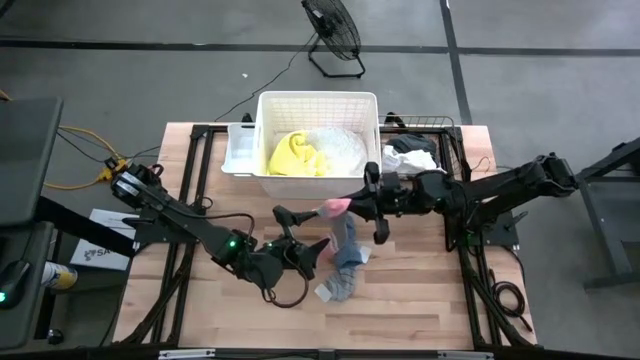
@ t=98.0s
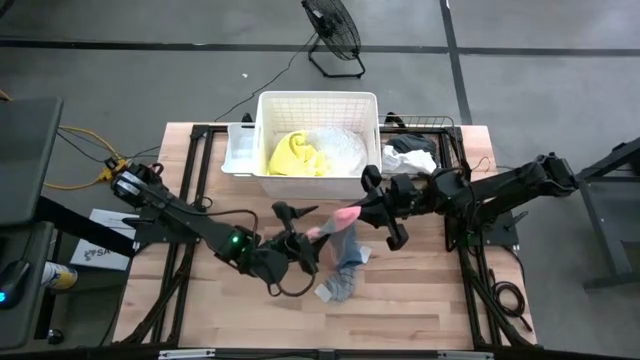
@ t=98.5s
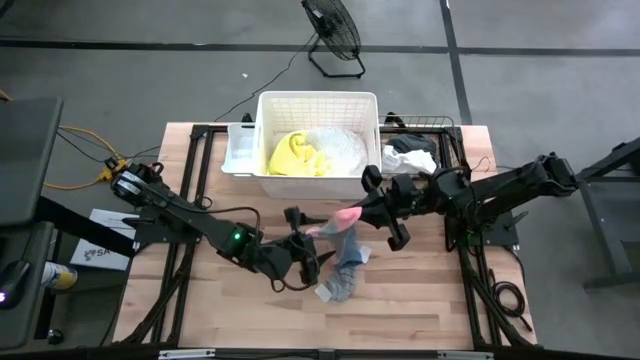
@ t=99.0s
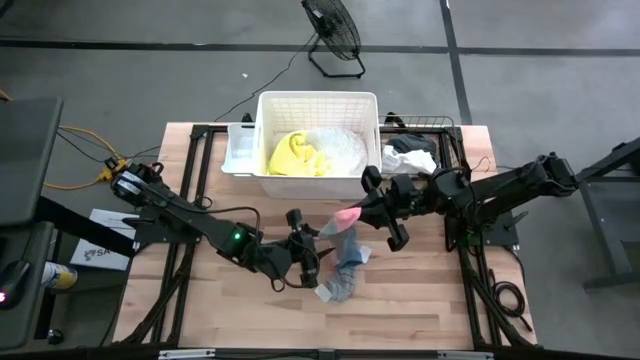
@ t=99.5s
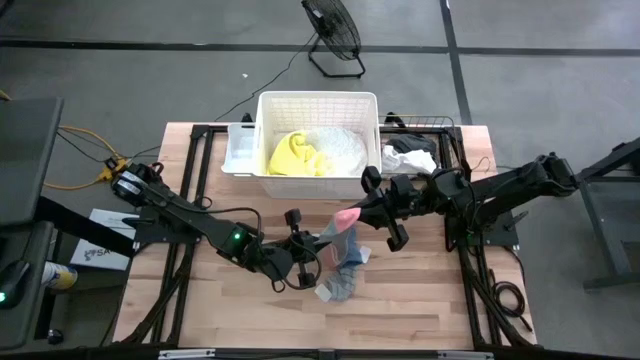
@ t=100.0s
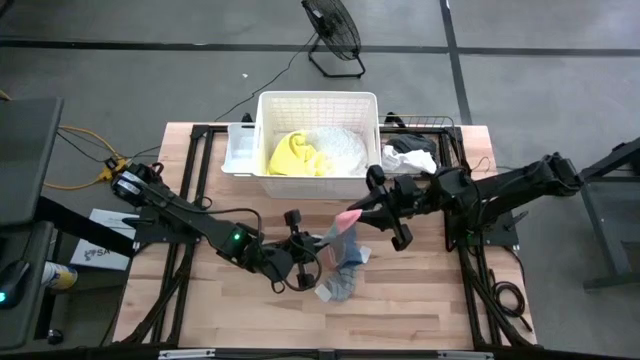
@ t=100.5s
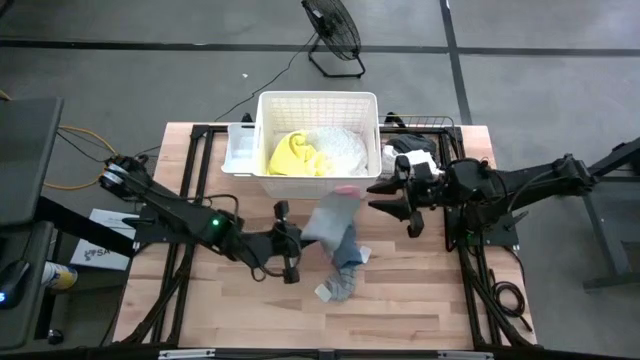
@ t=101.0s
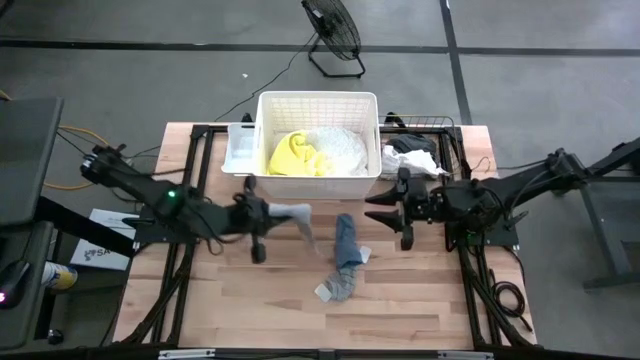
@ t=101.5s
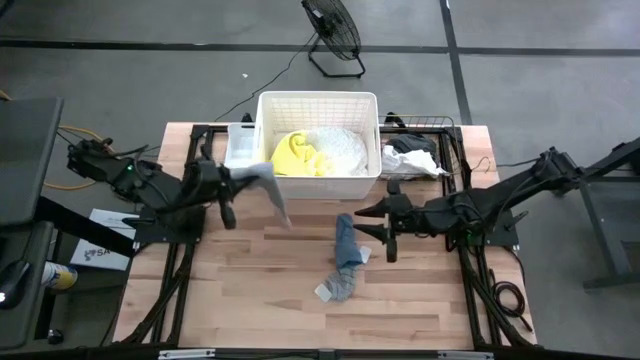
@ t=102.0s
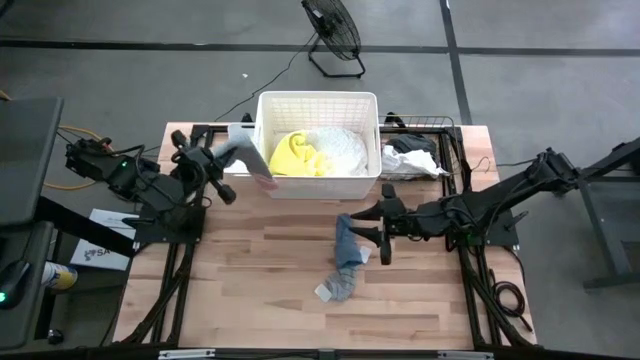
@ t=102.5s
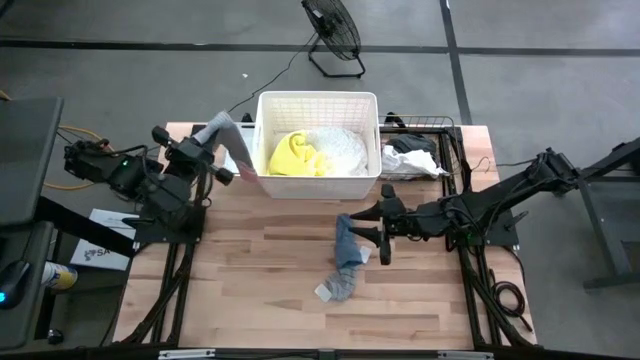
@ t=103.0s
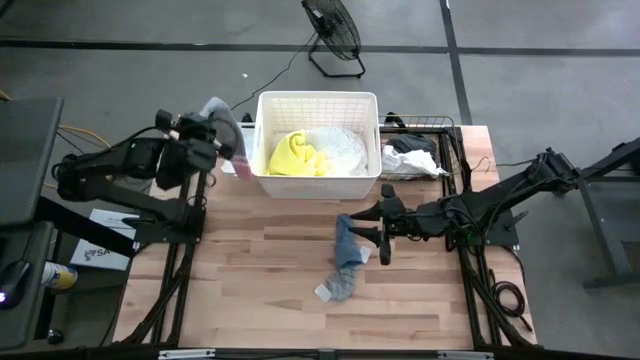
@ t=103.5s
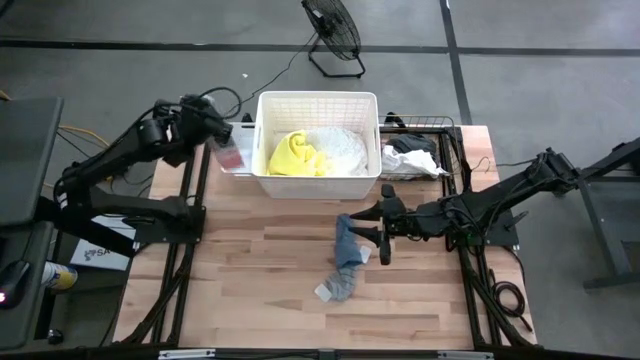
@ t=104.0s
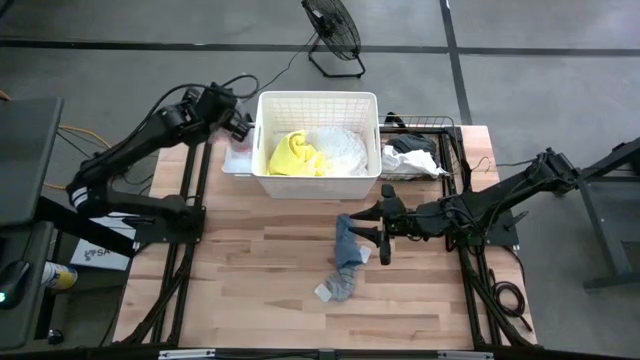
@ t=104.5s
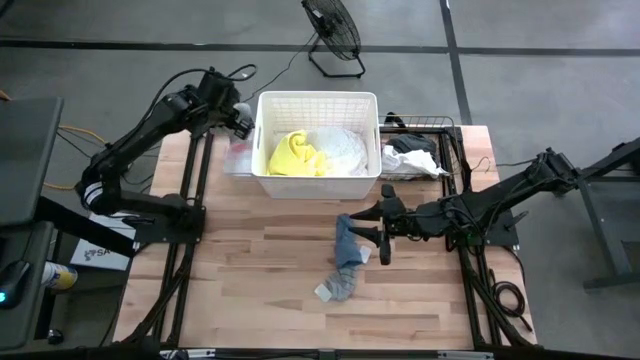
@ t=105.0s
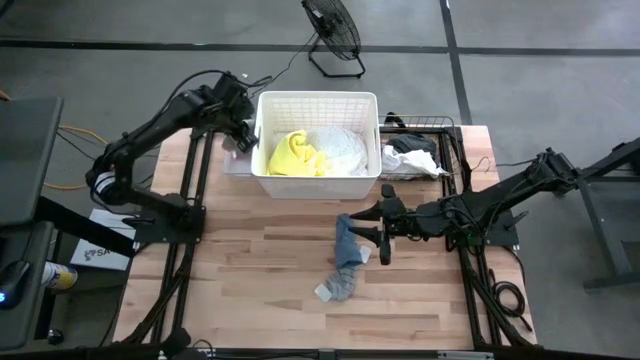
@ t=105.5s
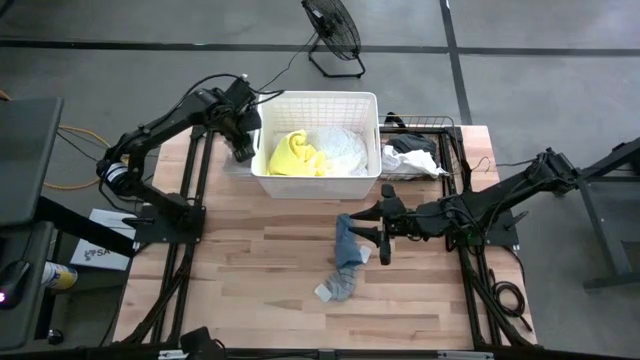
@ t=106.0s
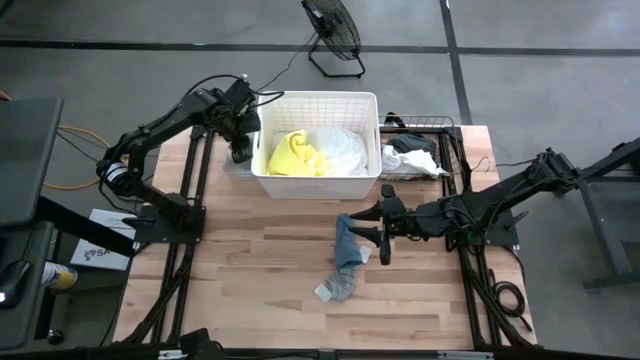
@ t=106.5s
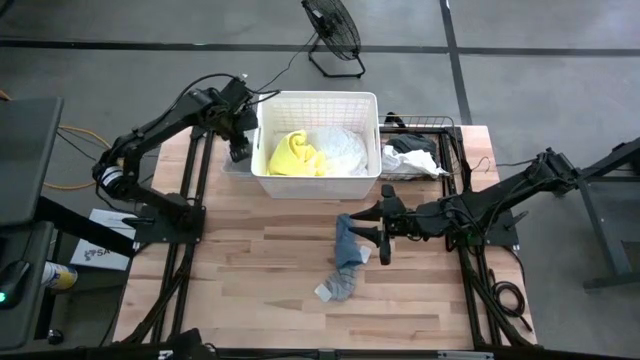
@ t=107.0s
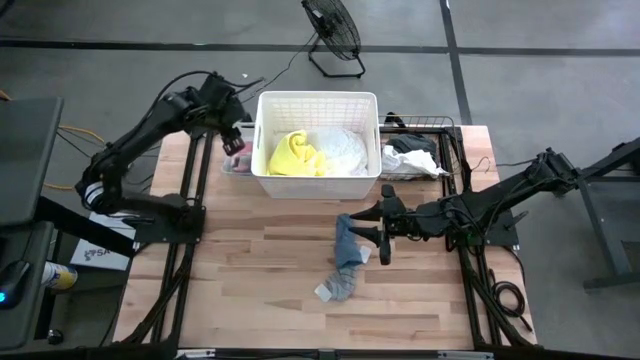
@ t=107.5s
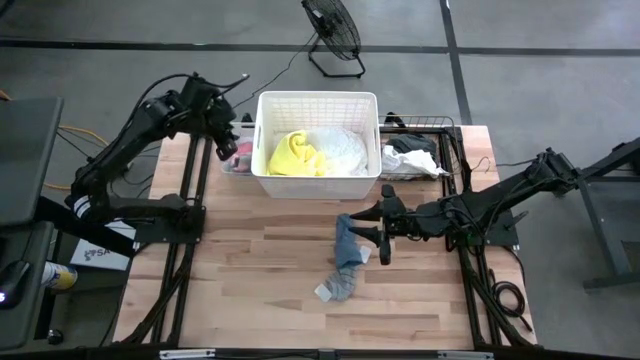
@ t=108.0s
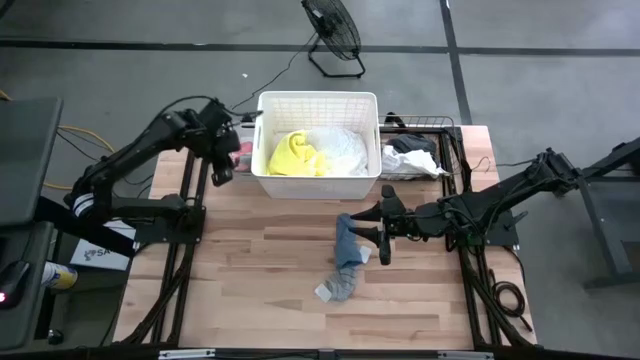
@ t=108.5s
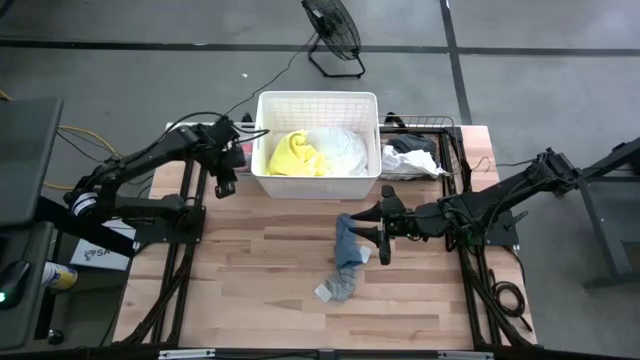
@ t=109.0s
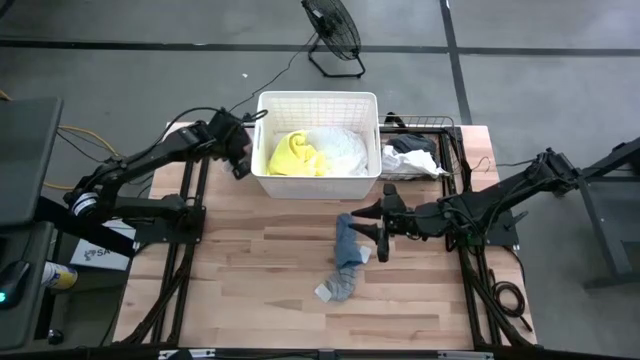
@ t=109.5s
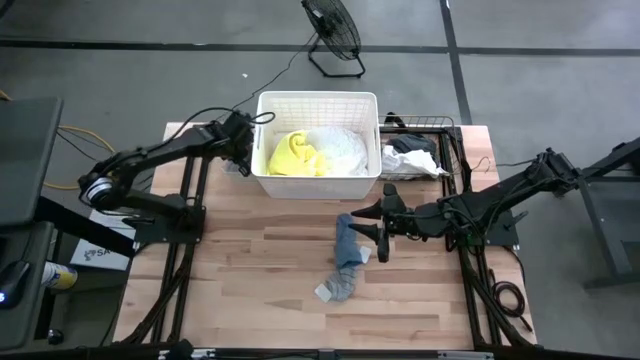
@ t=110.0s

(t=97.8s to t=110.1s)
Task: Pick & Place Cloths
Put the pink and gray sock into the white bin

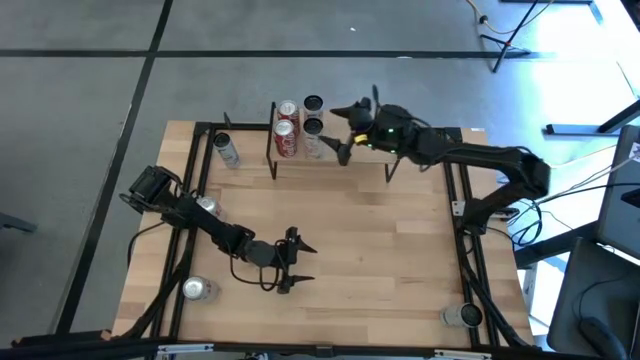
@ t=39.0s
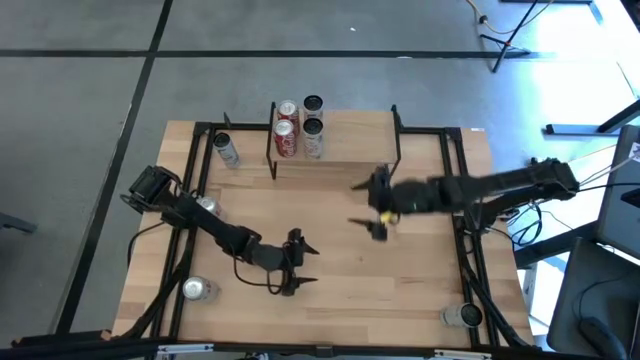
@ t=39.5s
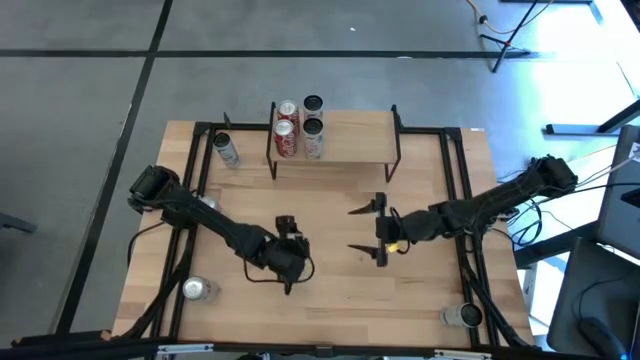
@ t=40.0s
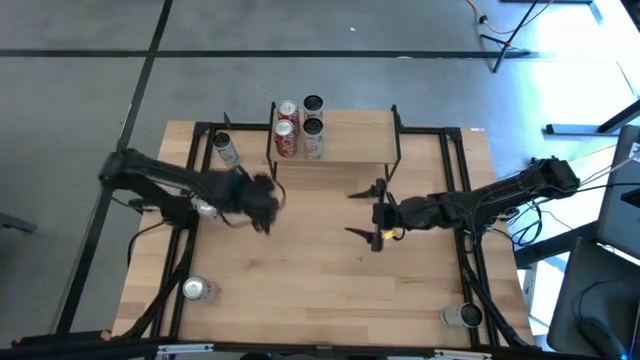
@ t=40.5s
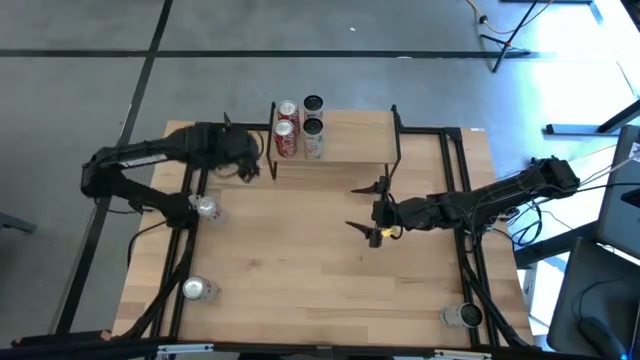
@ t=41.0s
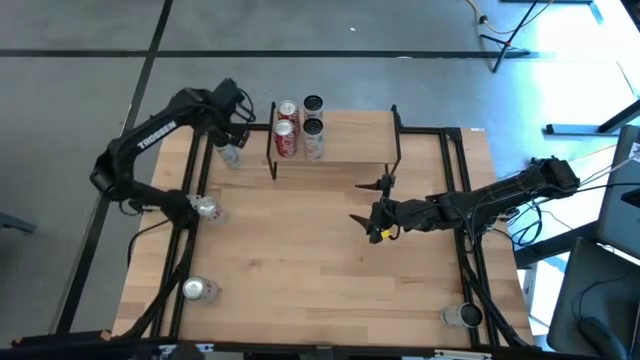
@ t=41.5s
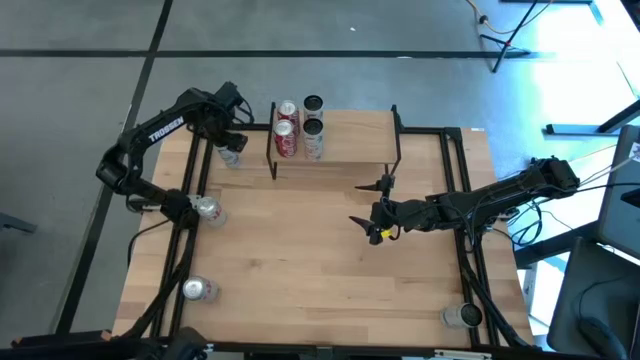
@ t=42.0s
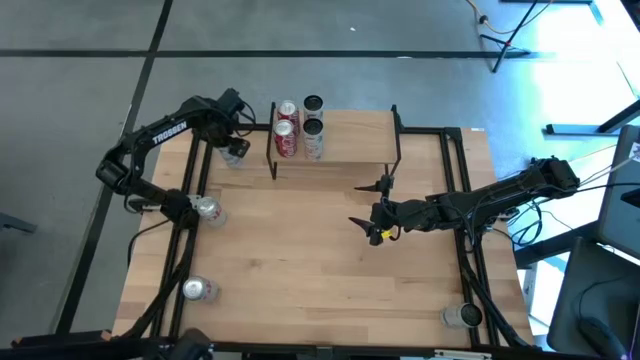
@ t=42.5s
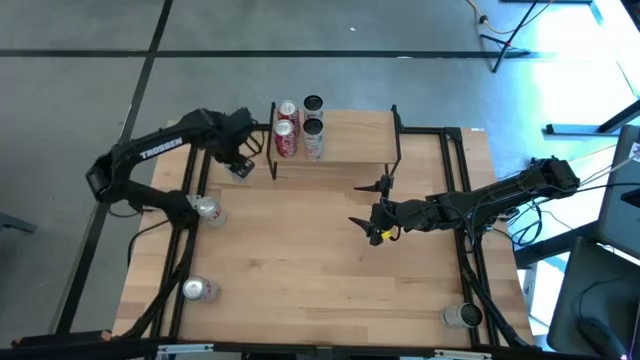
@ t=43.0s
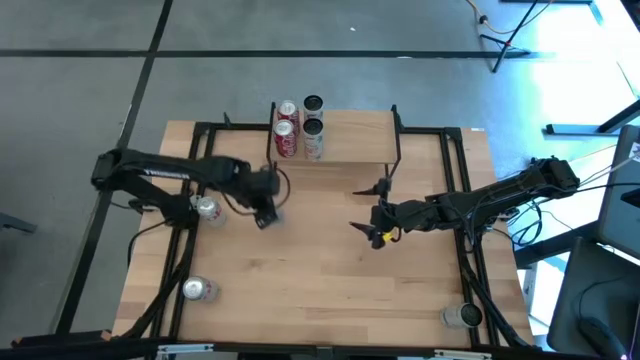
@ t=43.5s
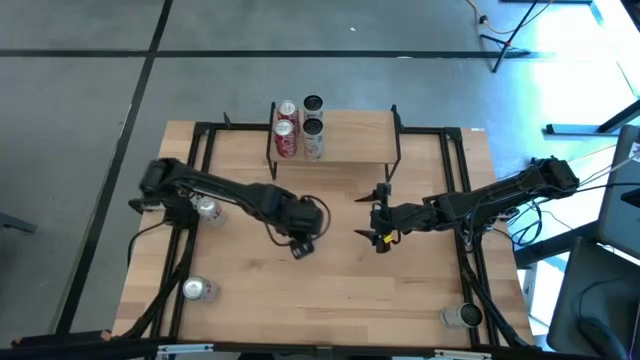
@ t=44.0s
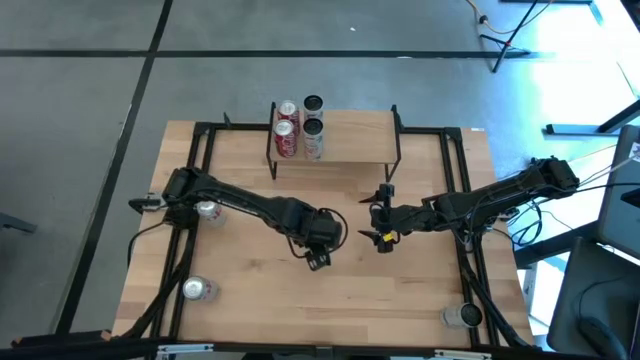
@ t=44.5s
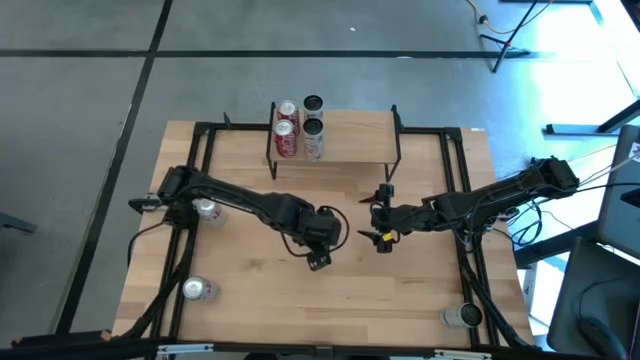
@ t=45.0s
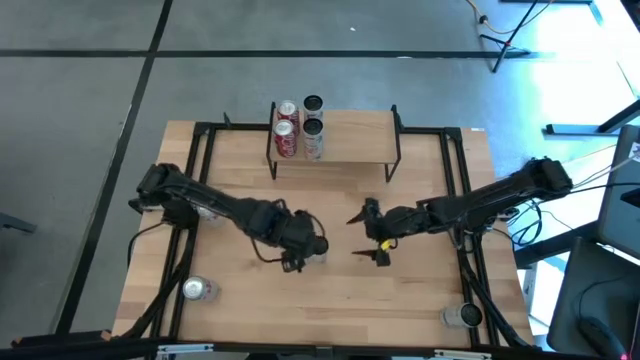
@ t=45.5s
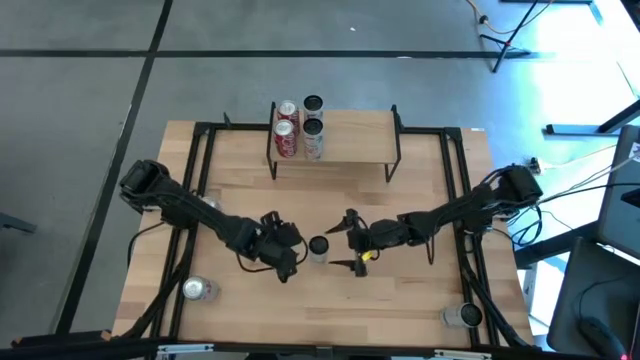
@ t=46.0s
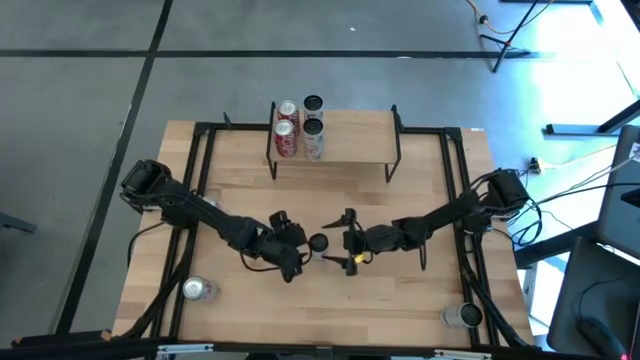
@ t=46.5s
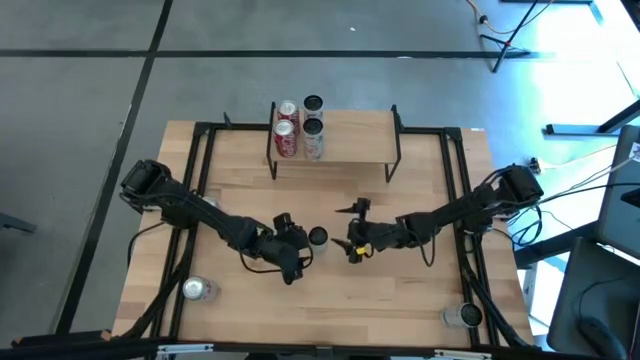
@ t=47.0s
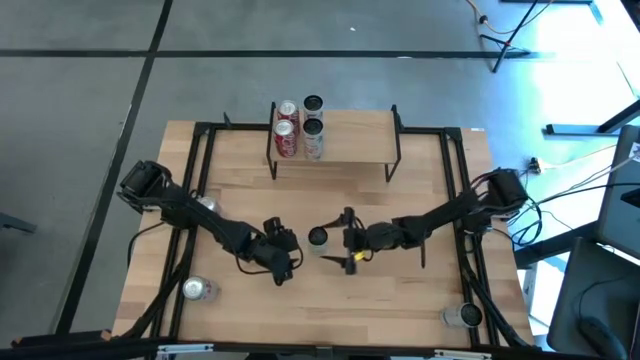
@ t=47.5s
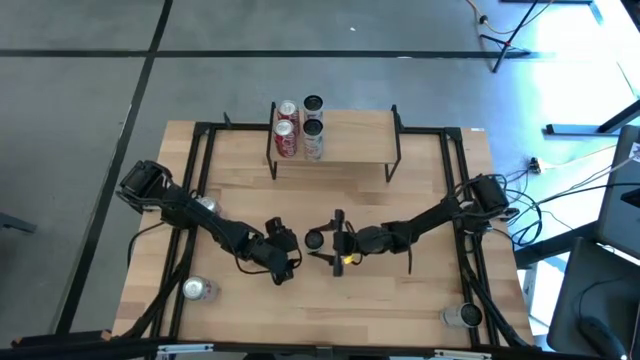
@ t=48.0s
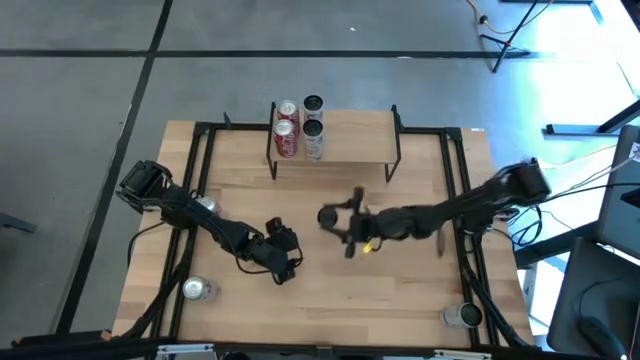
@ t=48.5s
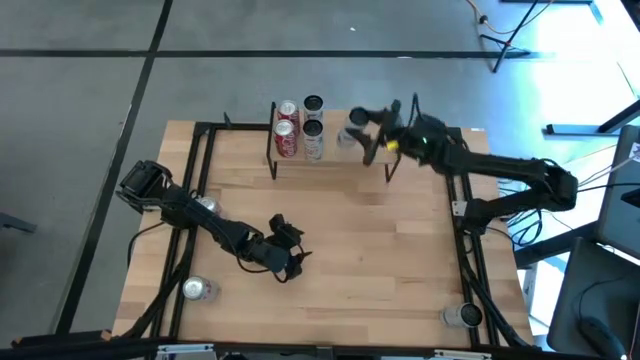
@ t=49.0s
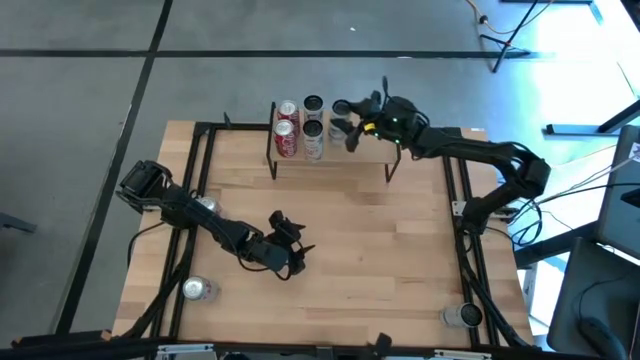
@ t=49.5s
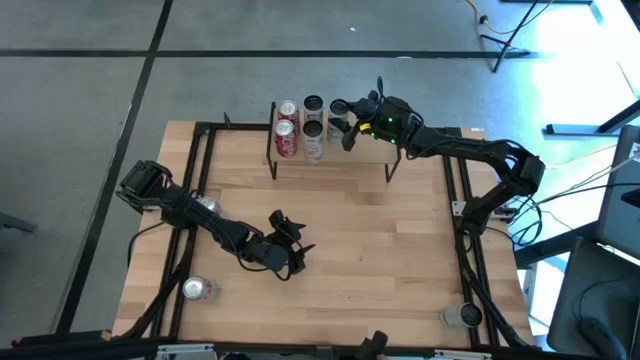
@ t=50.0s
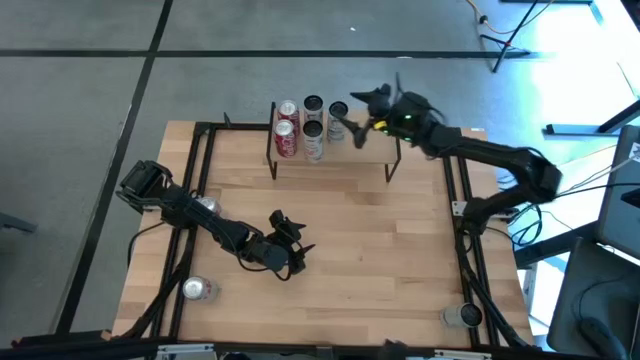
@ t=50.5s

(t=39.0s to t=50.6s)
Task: Place canned beverage on shelf
Put the top white-blue soda can on the shelf
